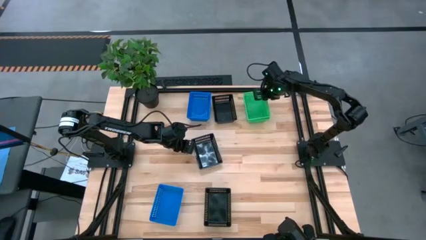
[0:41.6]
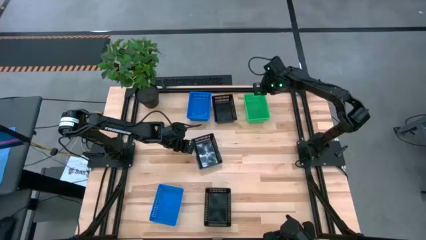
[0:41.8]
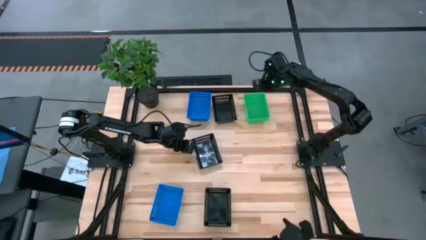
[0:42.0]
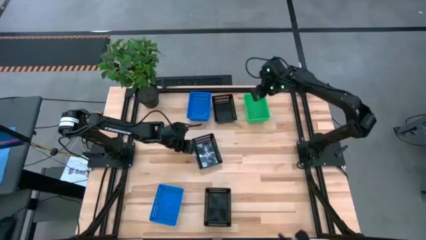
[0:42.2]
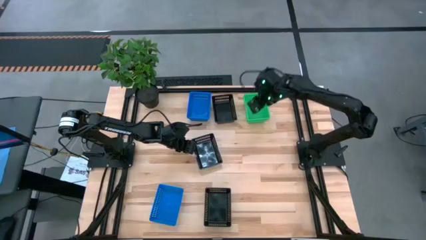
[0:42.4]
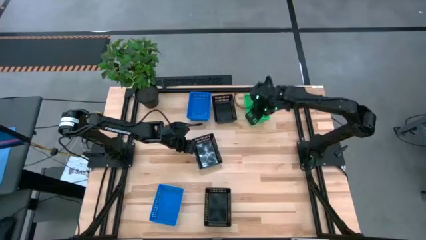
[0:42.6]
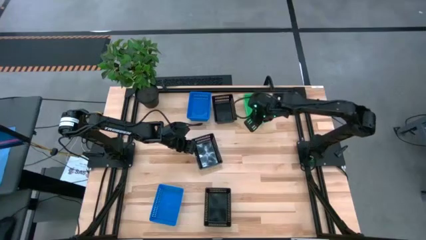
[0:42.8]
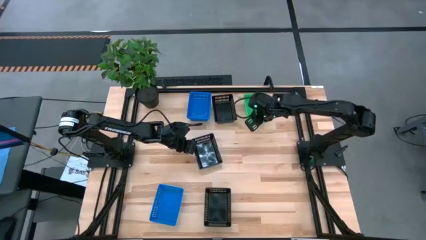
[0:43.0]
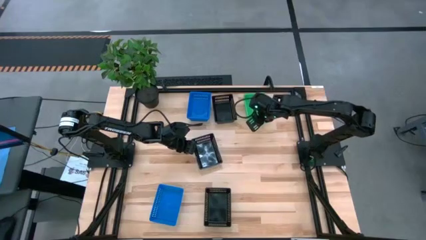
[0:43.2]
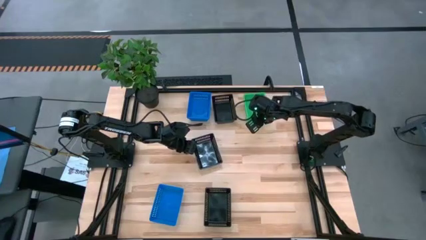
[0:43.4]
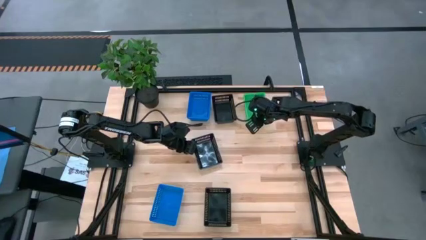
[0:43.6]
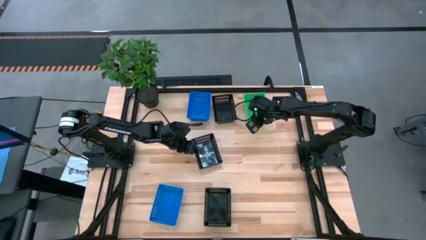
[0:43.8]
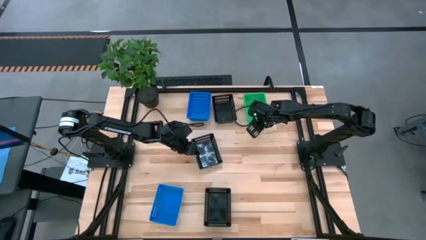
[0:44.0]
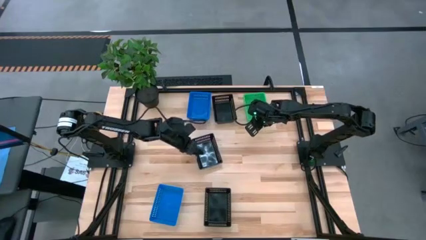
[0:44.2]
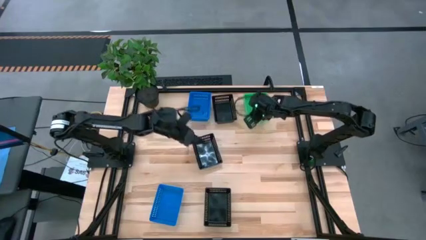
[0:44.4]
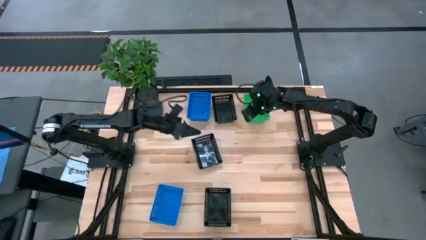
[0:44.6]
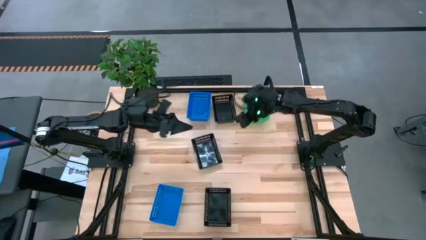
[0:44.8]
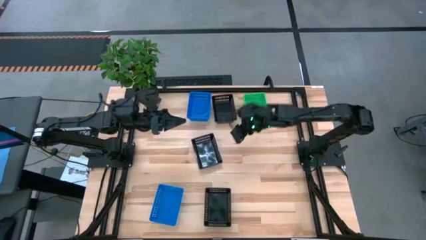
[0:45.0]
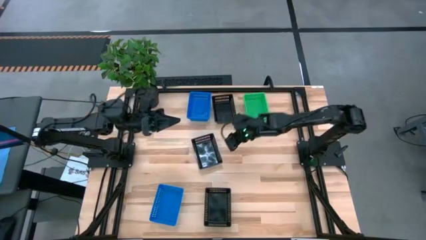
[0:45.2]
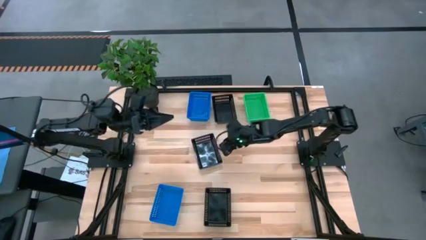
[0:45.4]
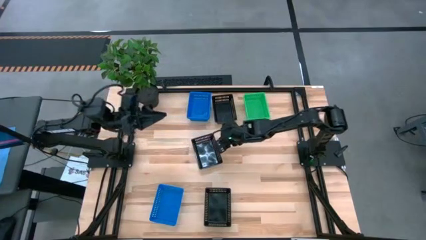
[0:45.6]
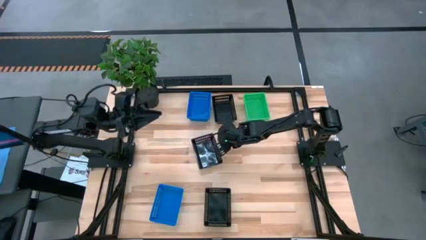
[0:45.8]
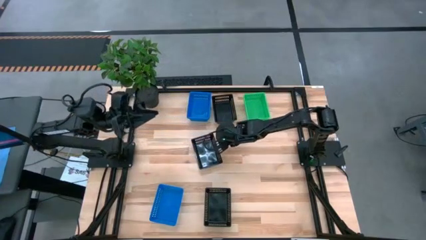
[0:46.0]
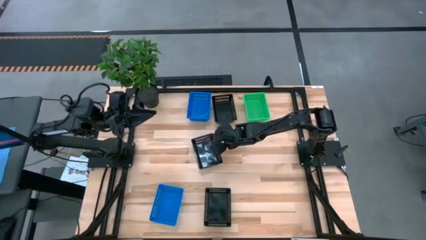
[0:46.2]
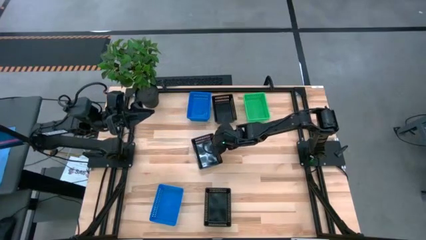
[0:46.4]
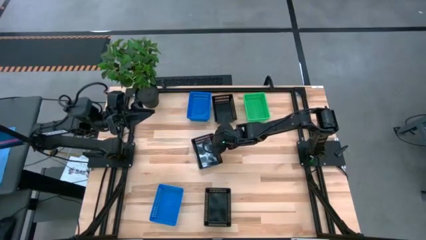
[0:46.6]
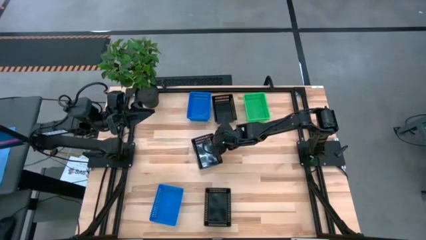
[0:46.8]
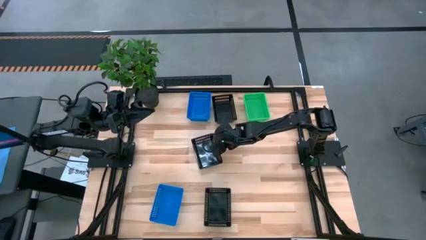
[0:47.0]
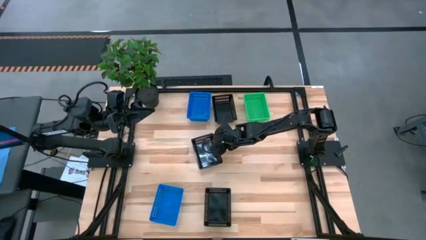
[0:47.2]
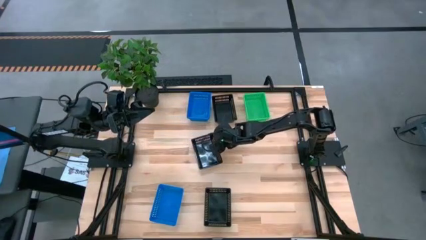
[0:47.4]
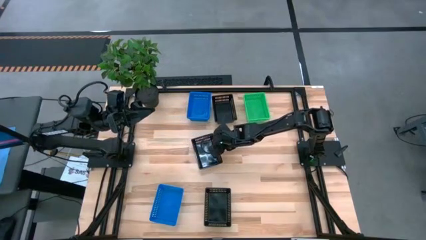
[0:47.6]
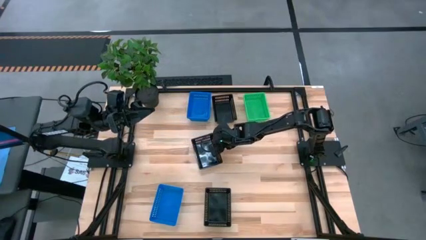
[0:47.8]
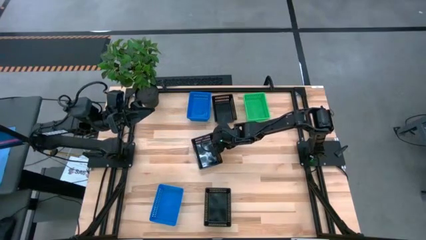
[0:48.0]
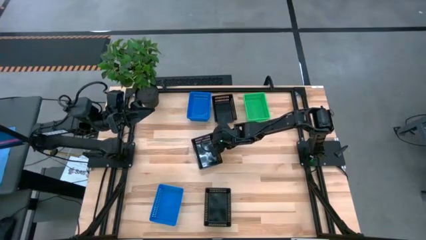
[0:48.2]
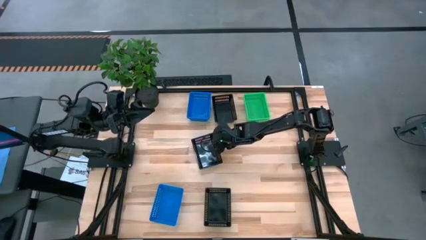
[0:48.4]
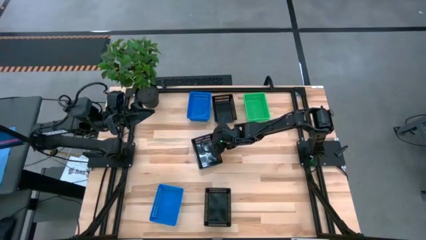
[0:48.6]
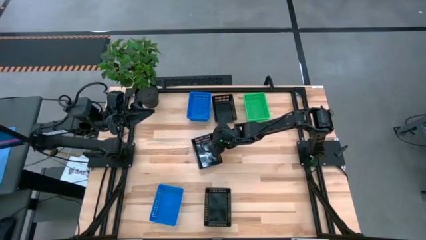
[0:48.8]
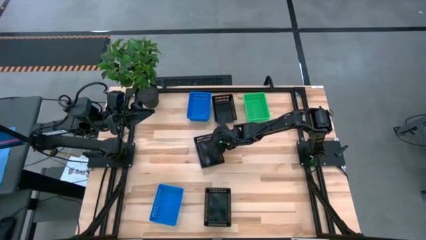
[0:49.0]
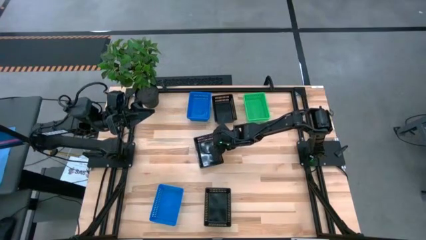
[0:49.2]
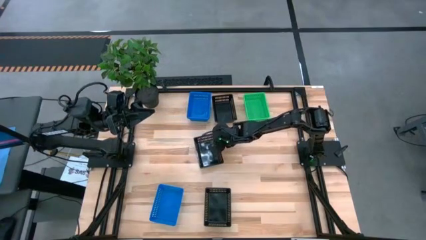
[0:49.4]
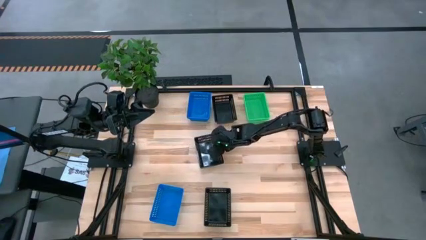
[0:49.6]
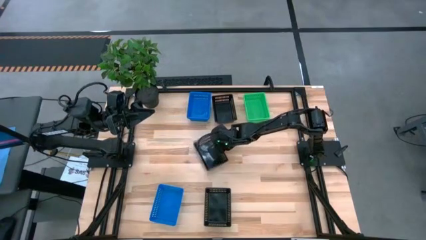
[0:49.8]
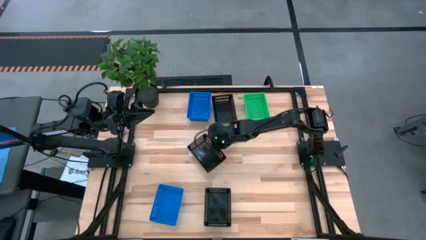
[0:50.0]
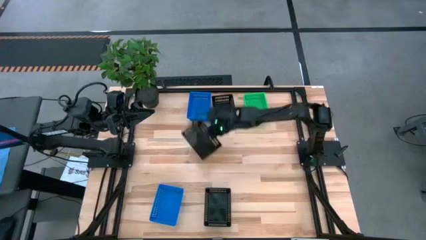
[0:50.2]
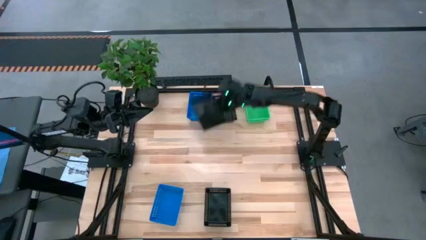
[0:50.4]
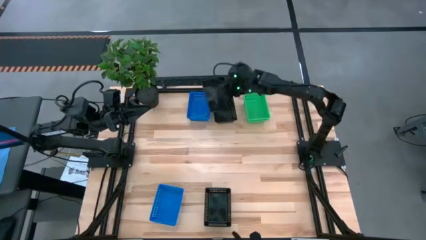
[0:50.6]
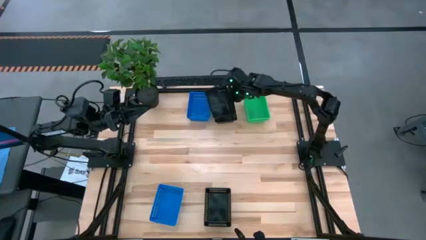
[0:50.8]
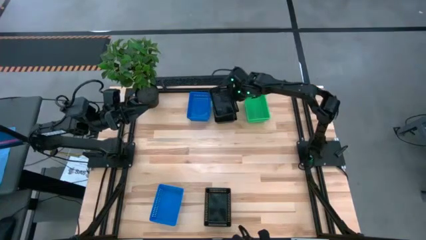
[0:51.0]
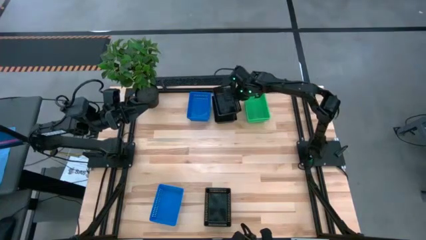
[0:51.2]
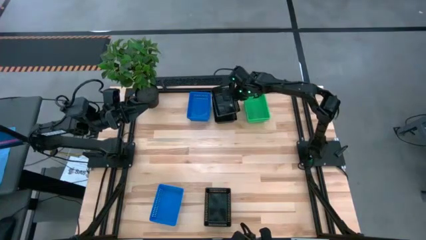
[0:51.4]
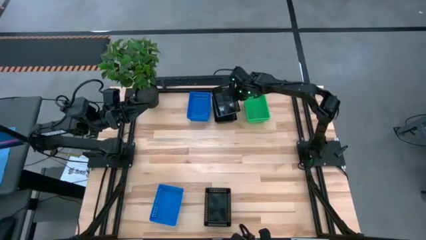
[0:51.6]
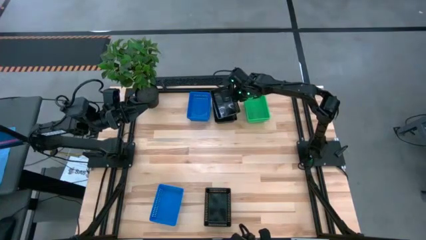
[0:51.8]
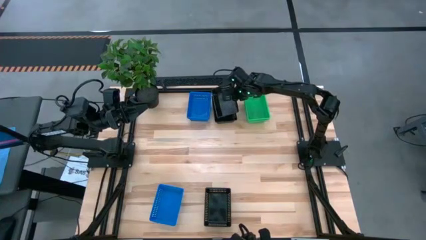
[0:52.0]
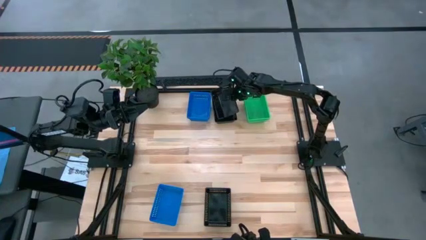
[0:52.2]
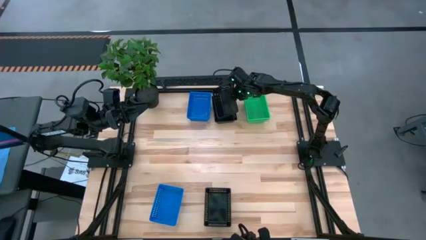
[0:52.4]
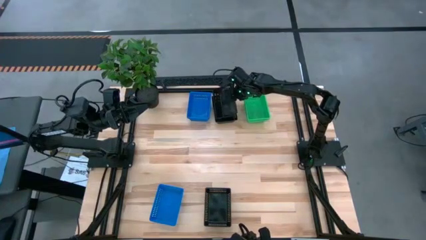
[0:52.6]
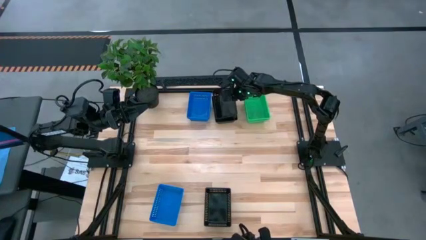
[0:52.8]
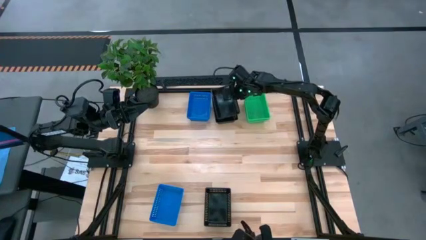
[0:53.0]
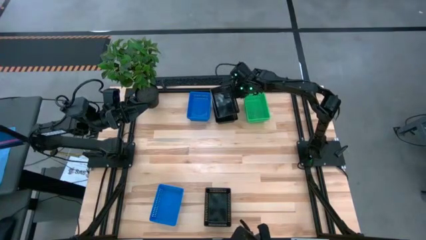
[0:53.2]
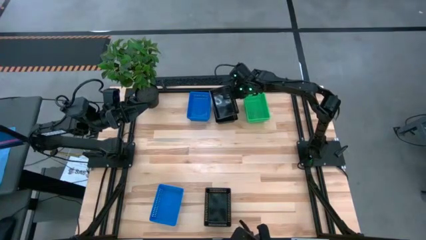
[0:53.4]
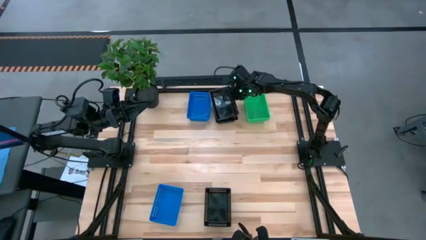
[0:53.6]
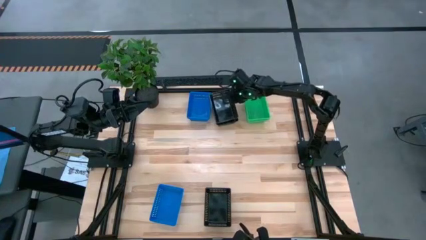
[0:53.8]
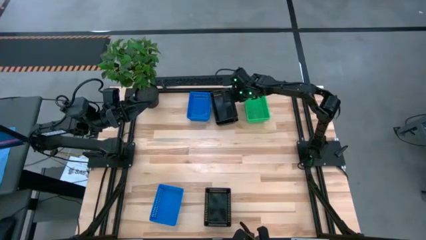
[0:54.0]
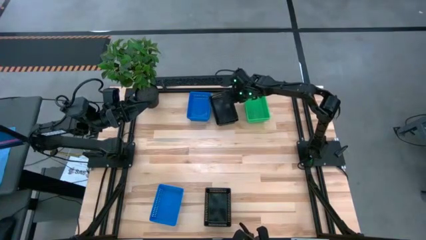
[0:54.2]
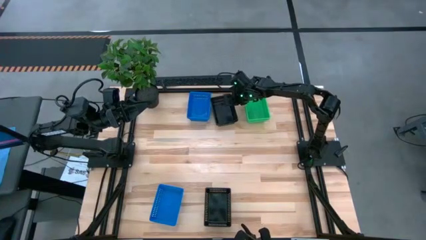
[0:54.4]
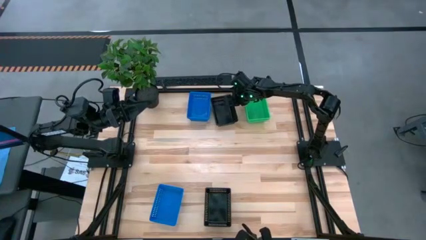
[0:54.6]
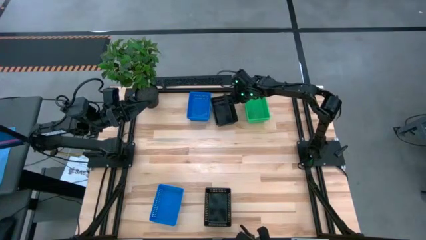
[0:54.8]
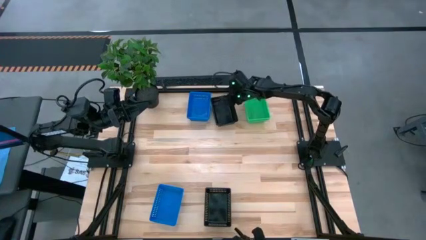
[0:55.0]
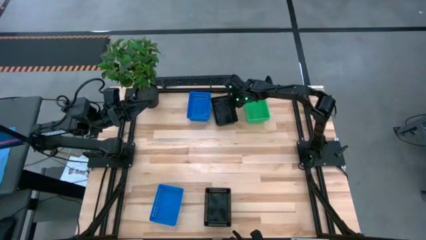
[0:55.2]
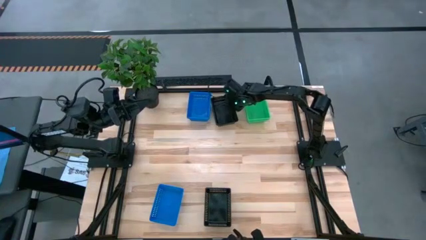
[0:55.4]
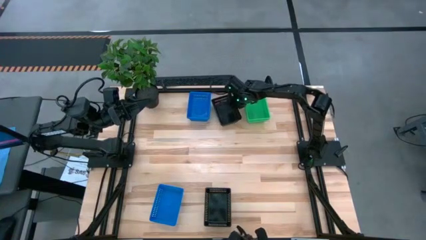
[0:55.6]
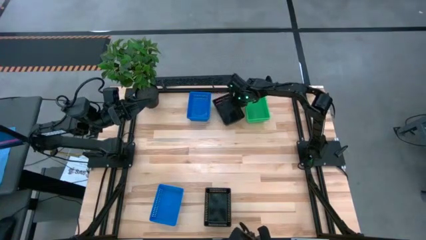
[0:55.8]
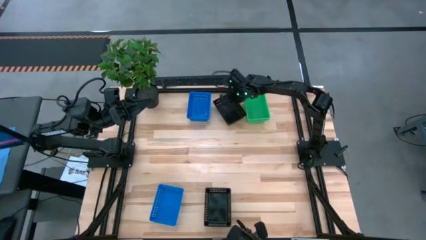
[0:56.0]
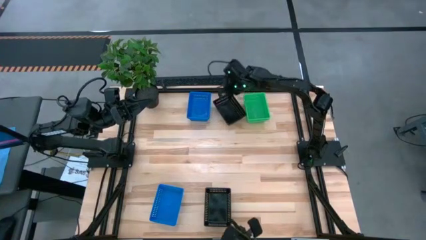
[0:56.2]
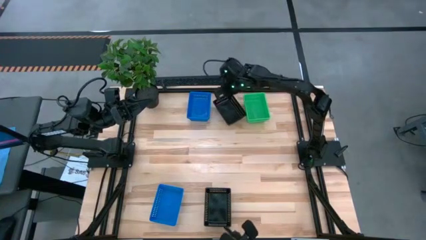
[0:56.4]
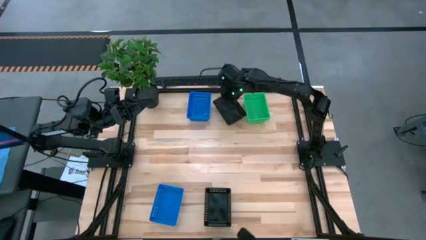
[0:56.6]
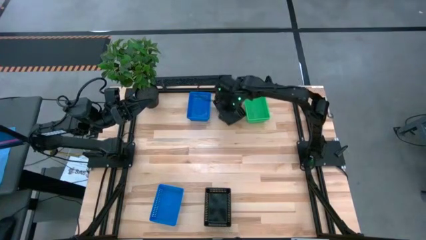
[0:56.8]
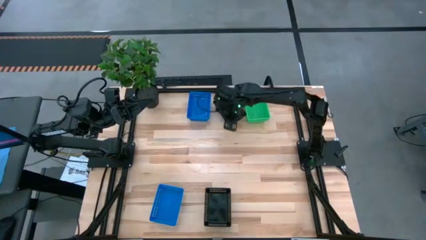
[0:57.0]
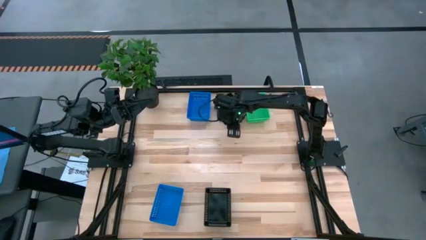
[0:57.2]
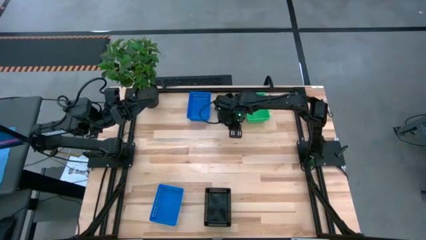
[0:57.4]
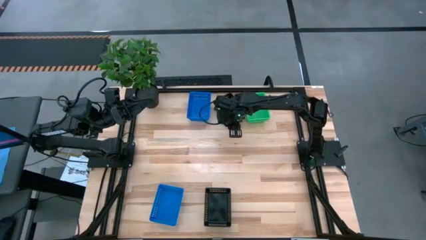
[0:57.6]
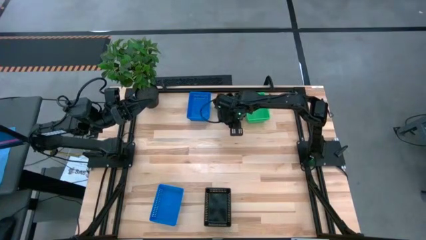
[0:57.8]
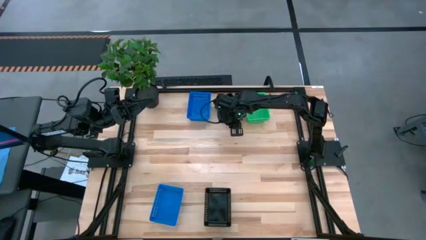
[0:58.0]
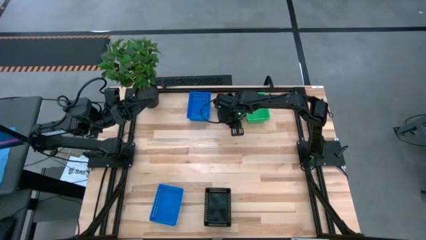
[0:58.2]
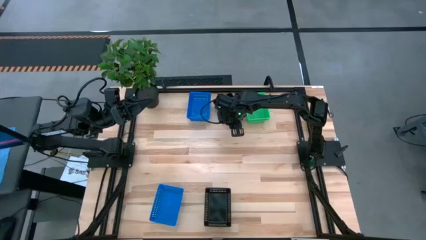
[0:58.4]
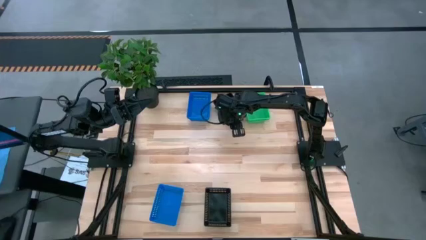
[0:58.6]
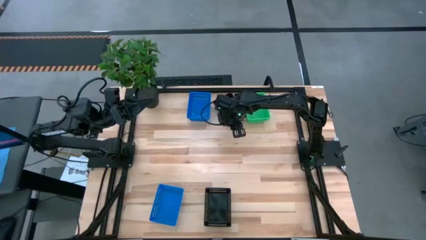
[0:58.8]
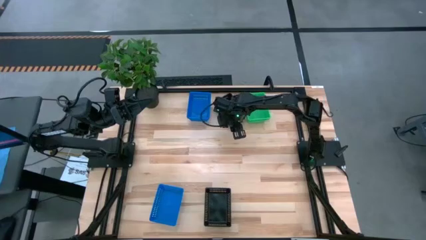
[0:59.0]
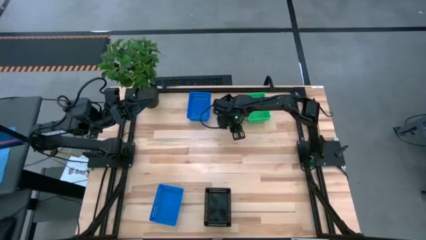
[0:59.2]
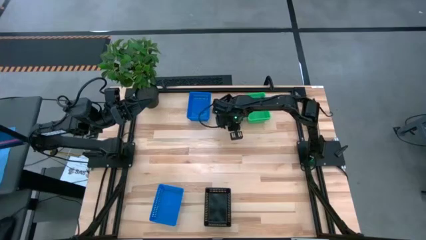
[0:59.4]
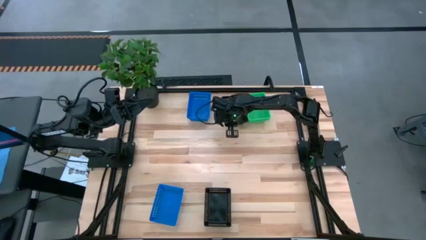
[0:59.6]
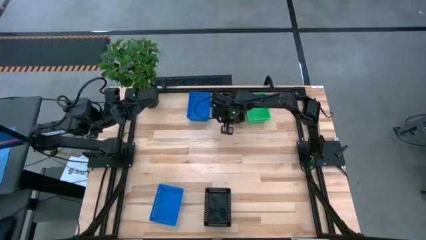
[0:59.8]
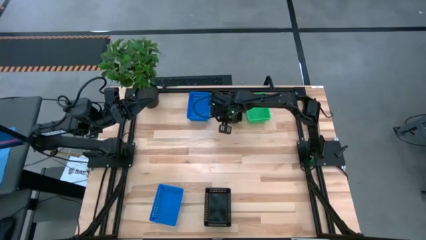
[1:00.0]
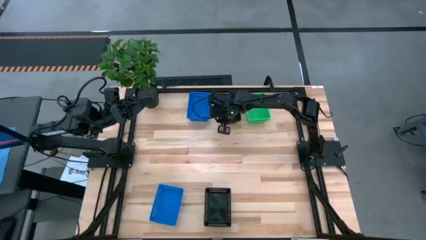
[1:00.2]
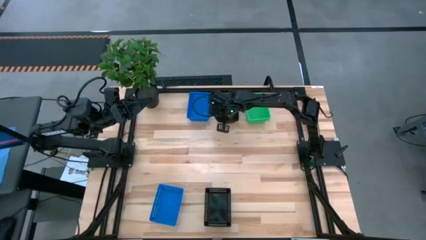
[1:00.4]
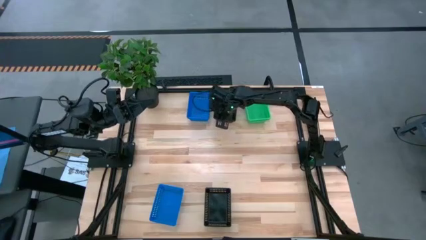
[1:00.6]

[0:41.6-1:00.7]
Stack the middle black bin on the top black bin
